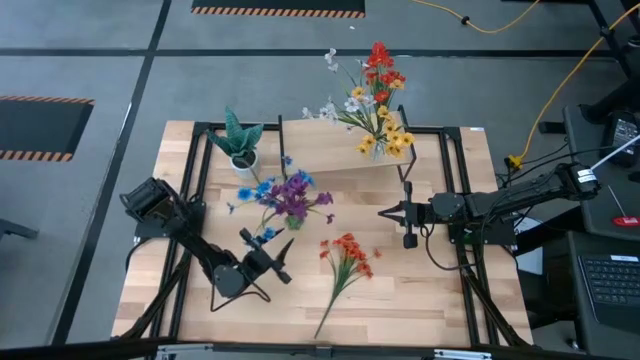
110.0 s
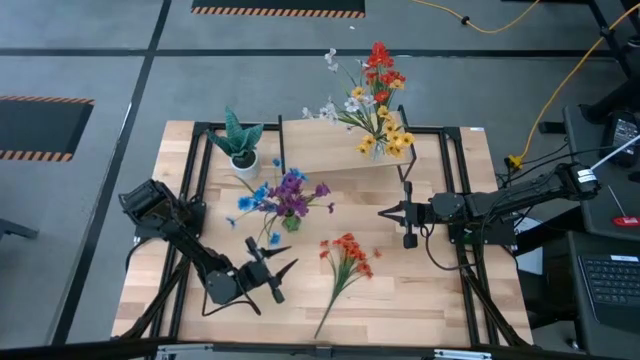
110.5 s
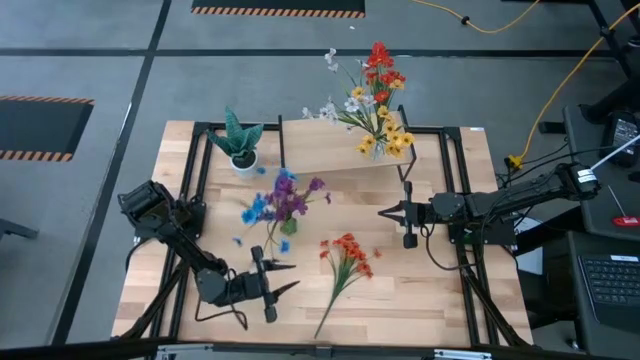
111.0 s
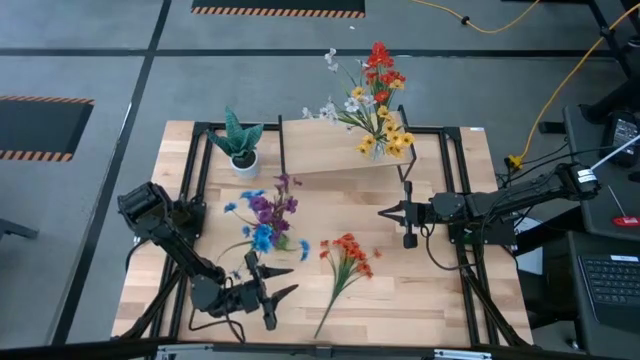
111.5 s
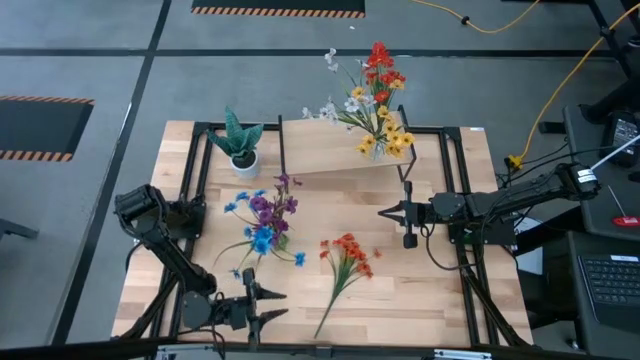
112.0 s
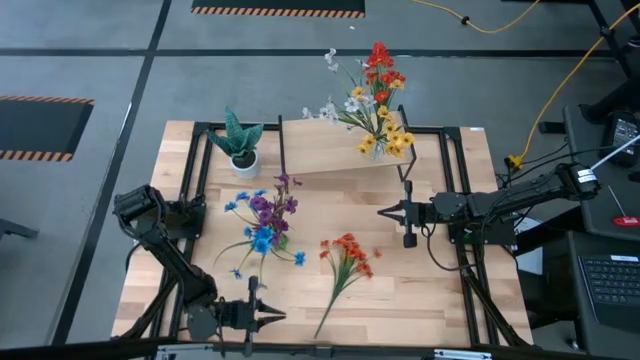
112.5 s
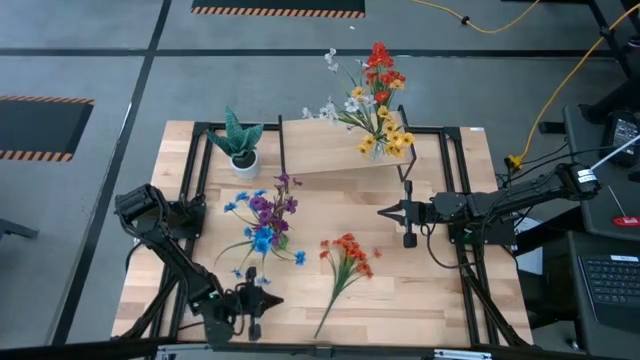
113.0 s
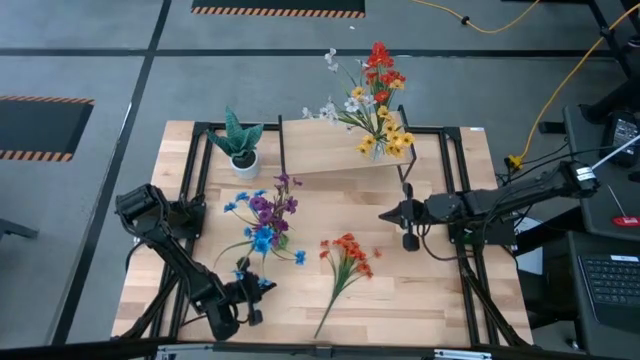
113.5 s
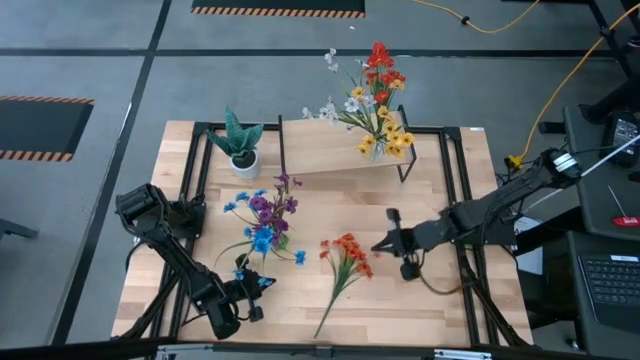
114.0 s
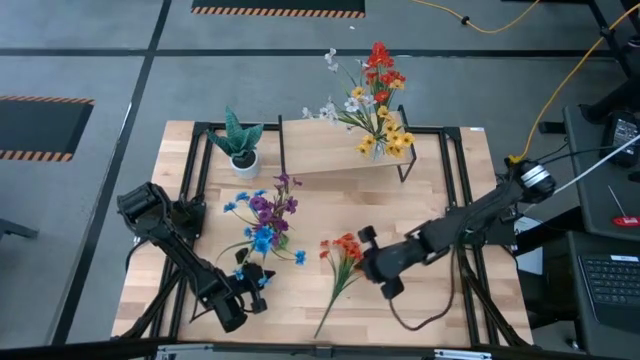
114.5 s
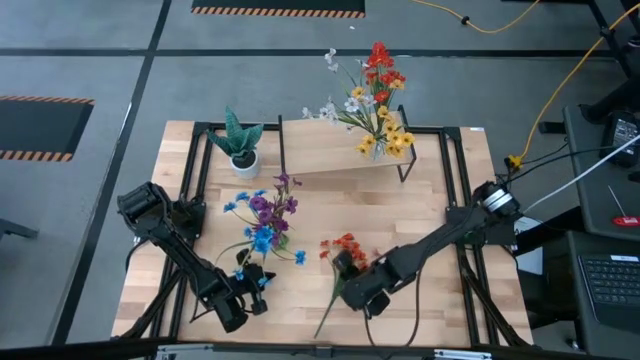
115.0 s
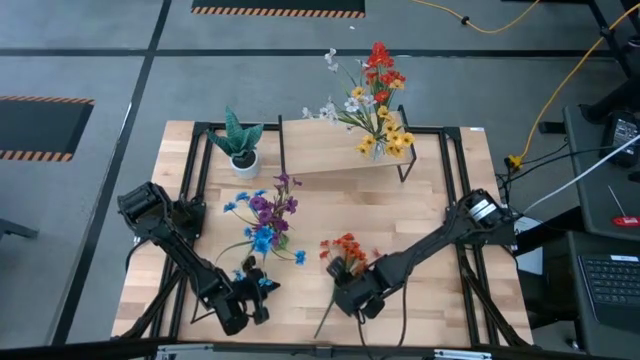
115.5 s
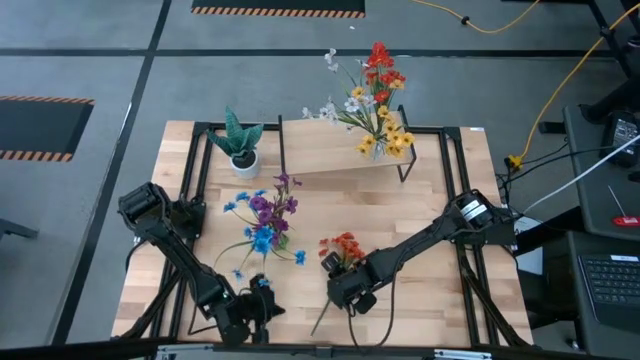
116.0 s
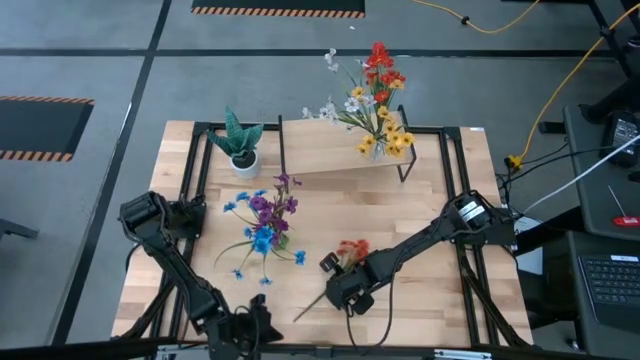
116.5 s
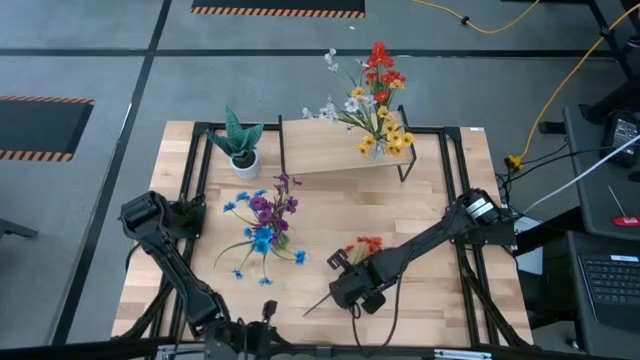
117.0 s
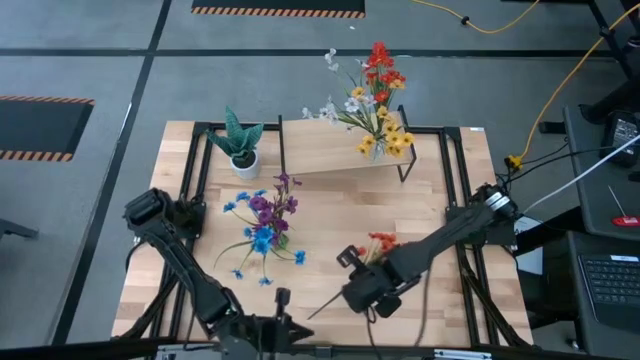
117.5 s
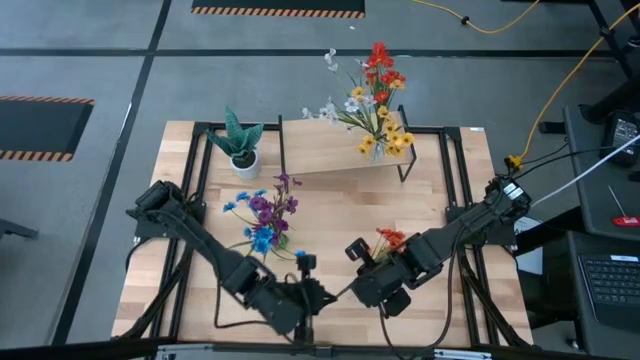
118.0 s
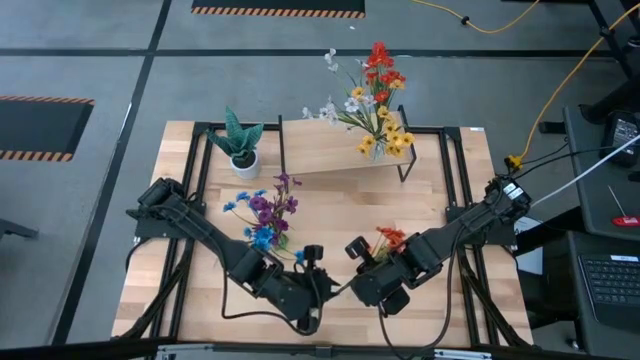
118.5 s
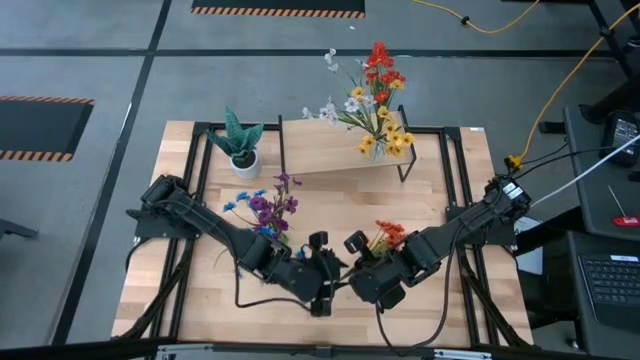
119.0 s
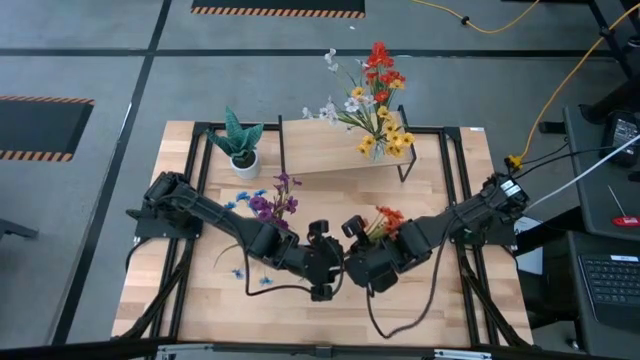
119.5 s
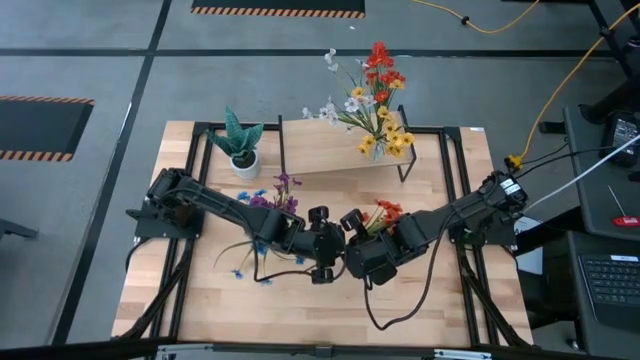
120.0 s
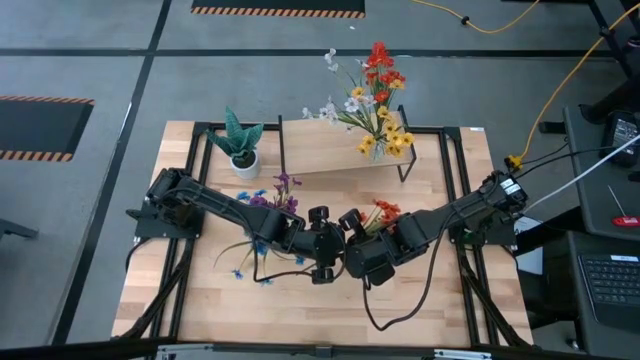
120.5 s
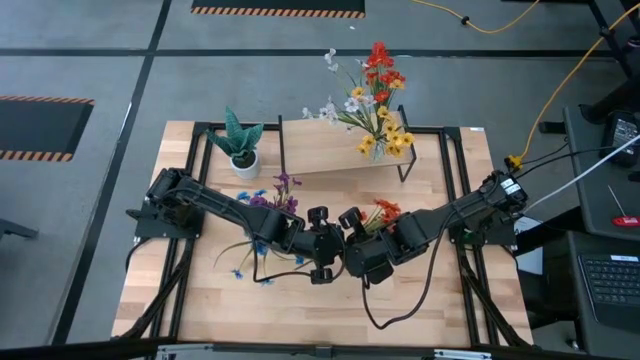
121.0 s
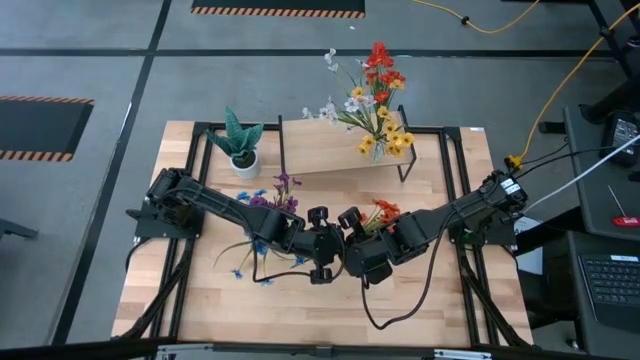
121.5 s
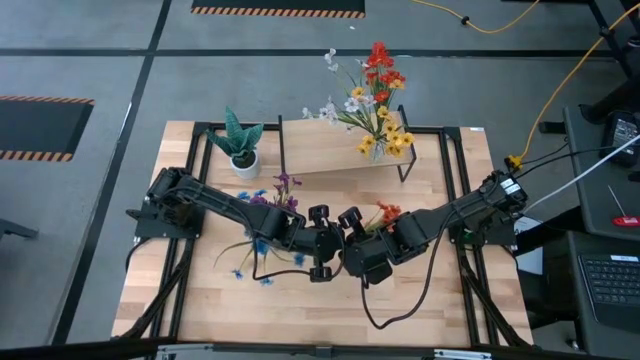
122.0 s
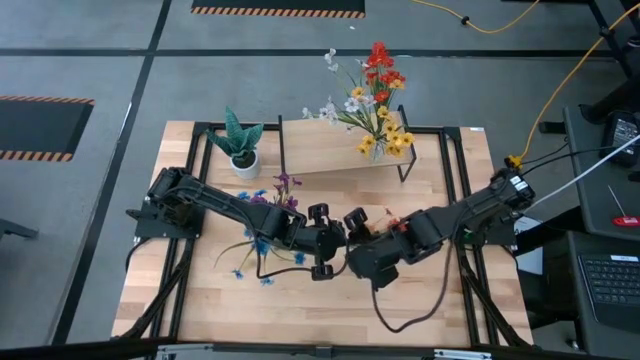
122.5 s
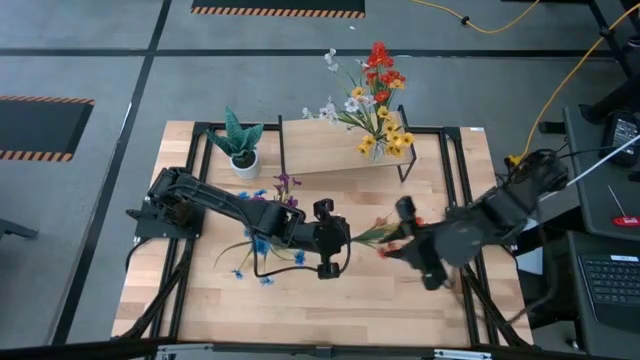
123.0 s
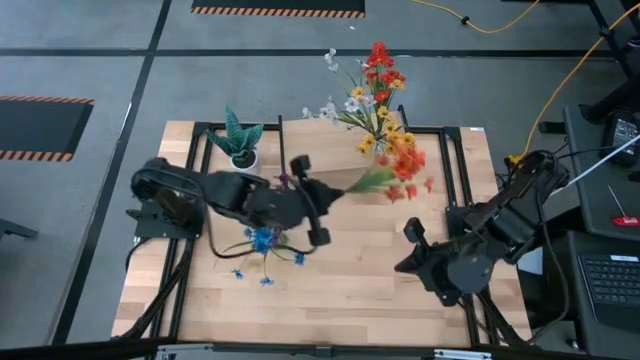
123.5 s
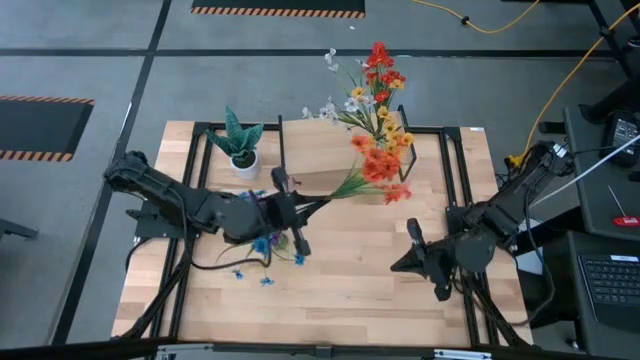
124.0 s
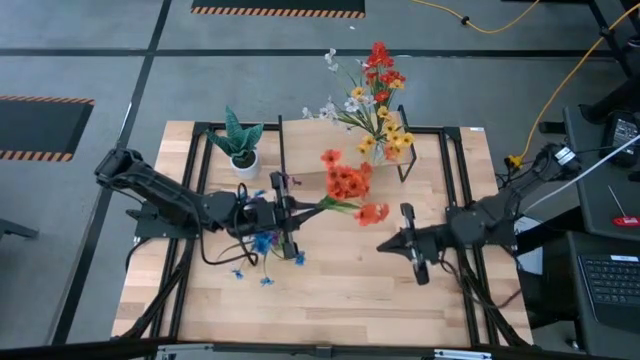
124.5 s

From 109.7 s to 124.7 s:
Task: Pick and place flowers into a vace then onto a shelf
Put the orange flowers into the green transparent vase

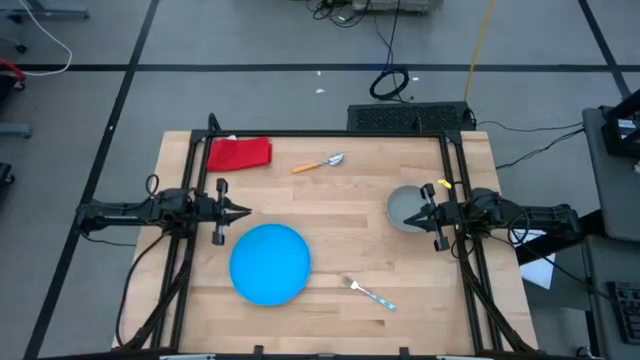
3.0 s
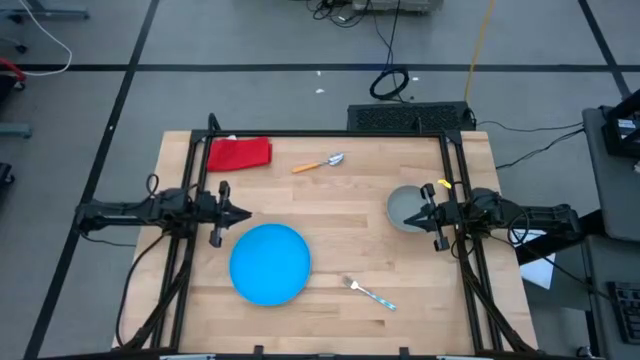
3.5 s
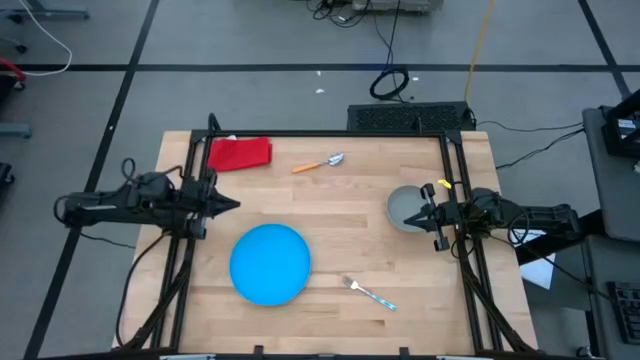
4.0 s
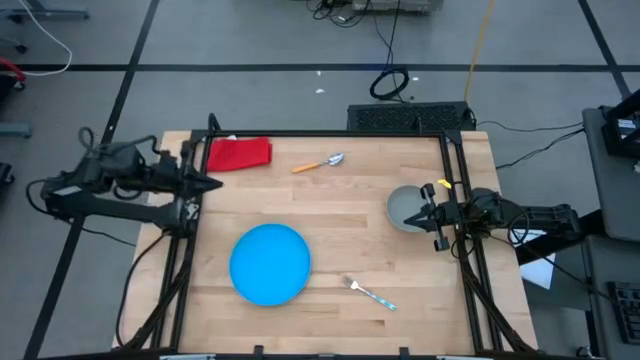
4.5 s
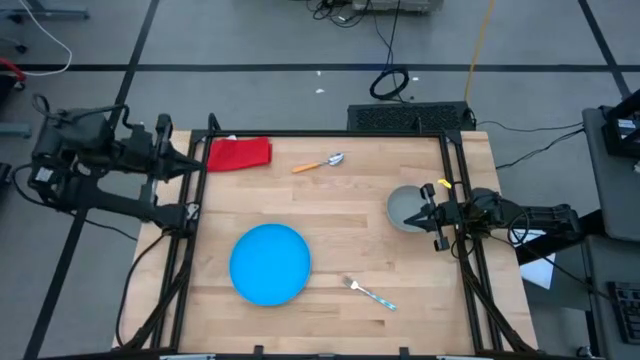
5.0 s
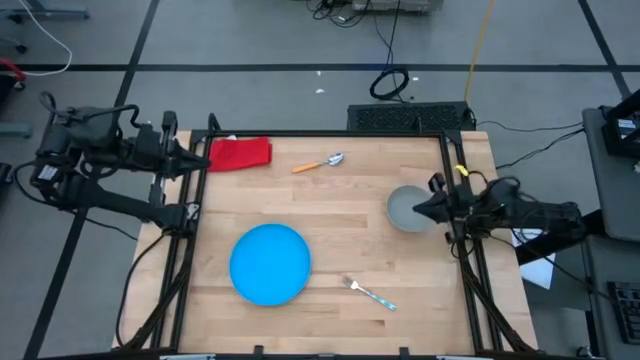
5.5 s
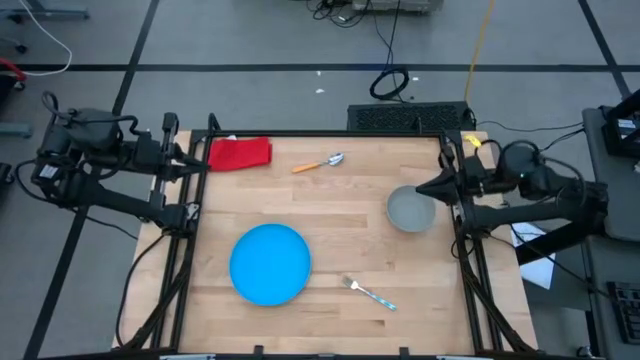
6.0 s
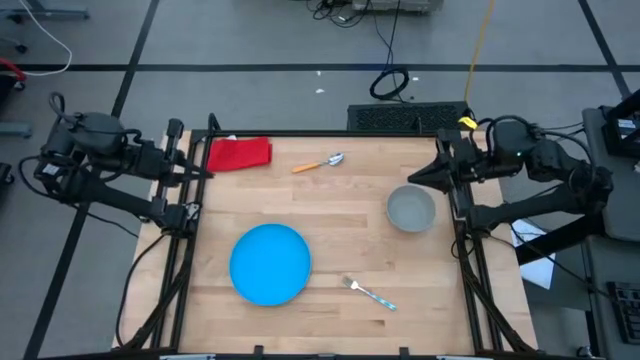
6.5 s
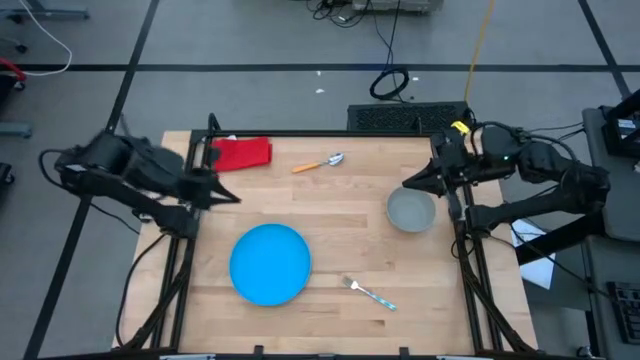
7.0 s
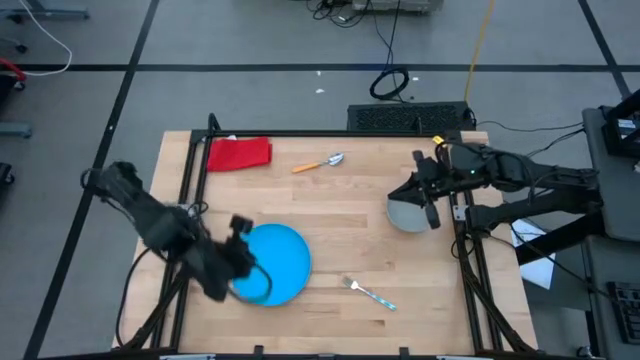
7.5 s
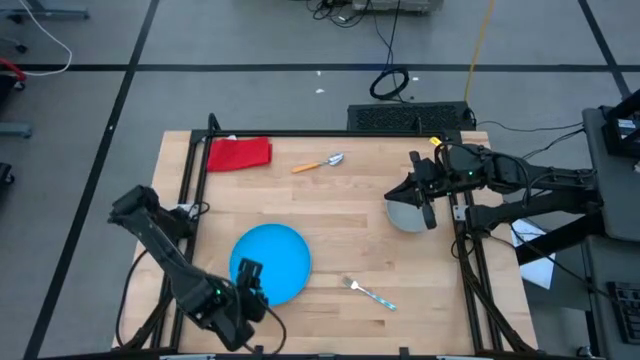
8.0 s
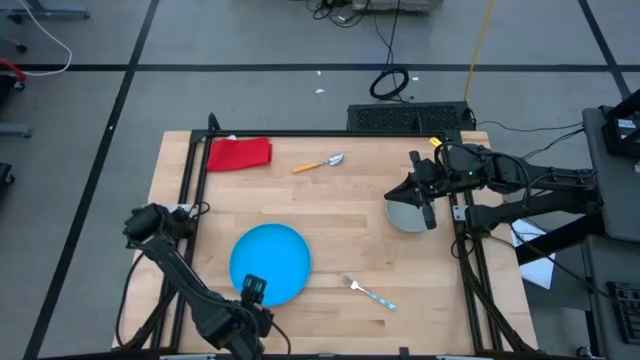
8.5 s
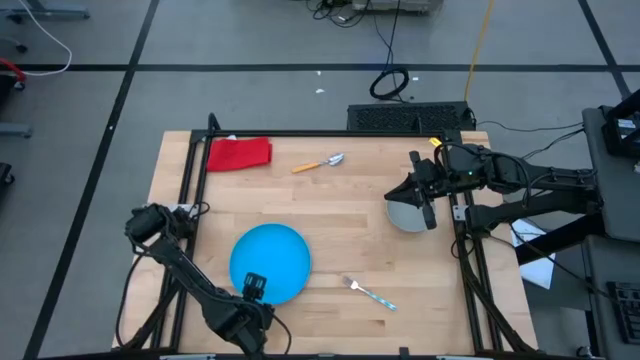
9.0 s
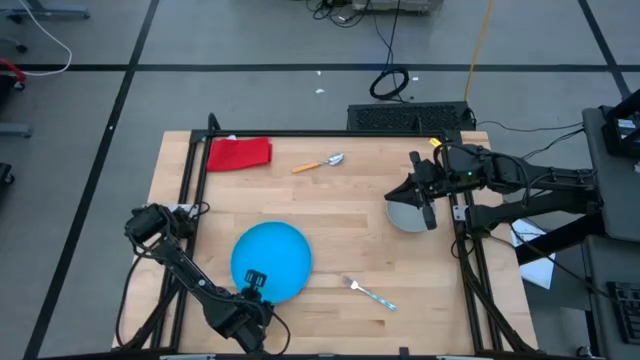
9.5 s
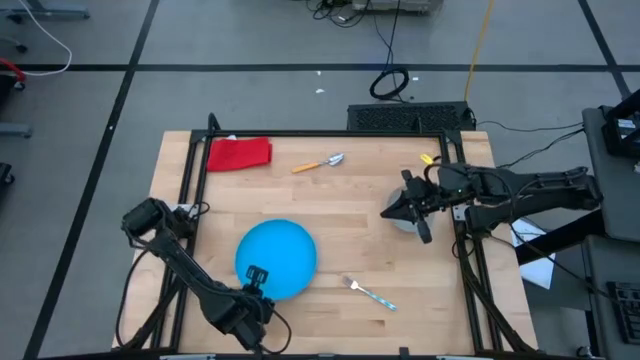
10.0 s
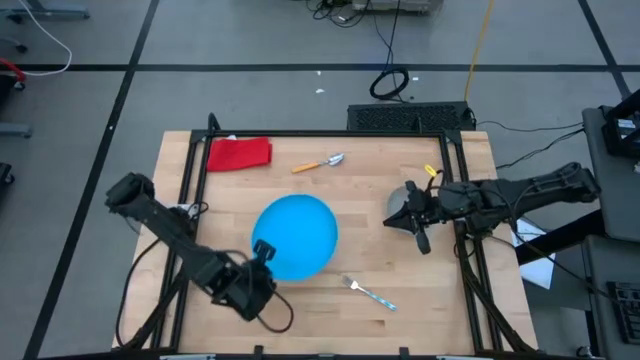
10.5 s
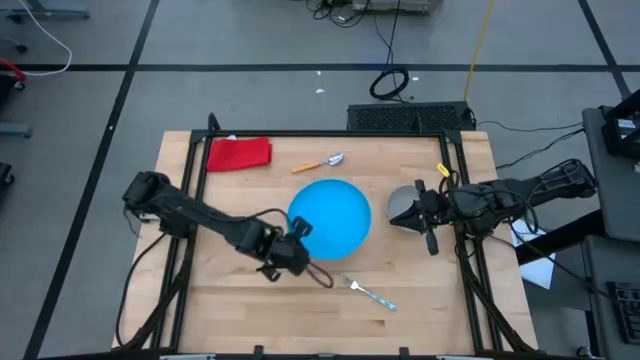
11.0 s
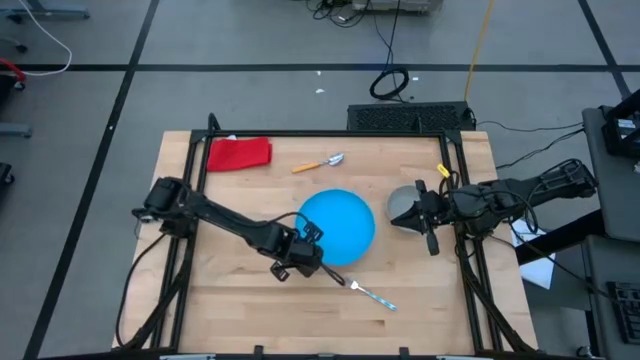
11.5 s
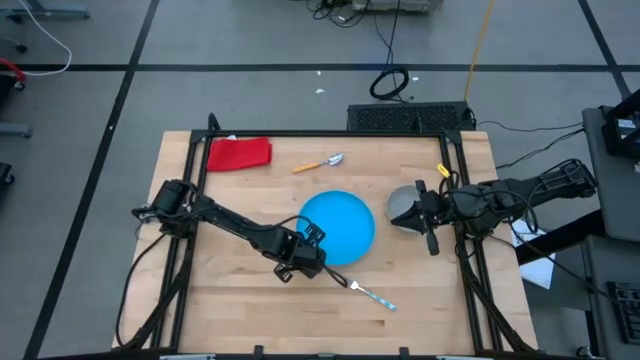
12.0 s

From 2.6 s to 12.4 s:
Task: Set table place
Move the blue plate to the center of the table
